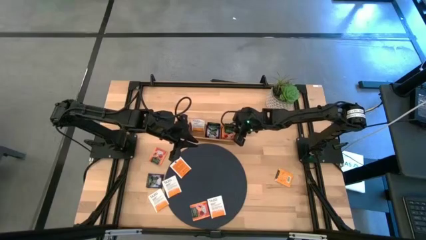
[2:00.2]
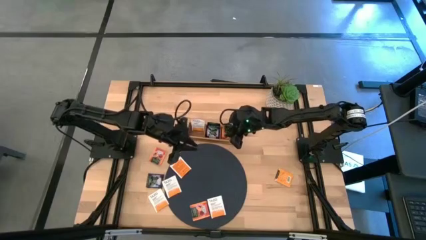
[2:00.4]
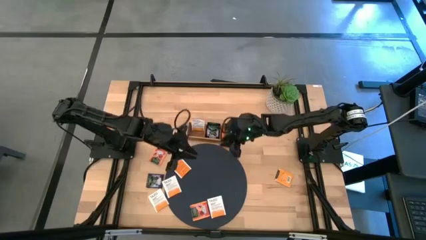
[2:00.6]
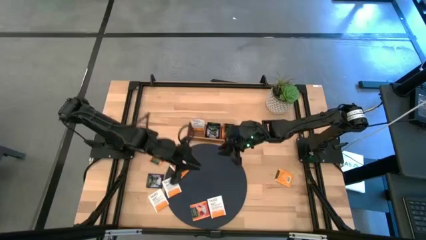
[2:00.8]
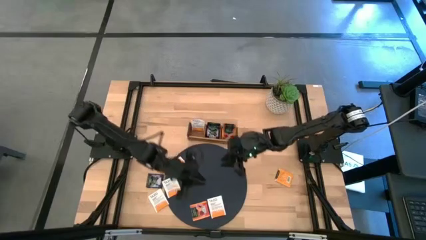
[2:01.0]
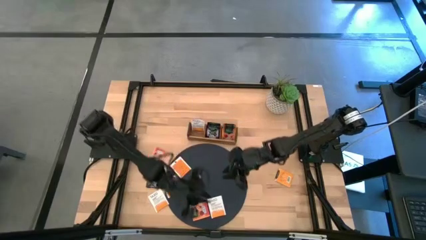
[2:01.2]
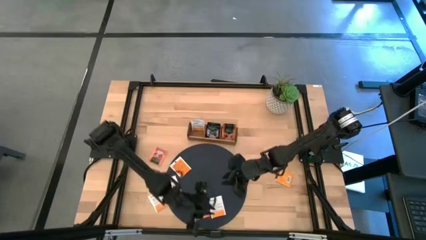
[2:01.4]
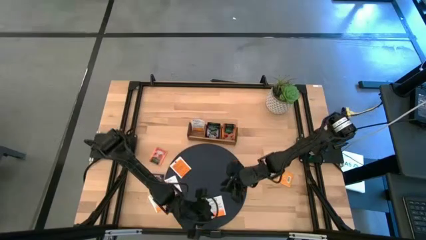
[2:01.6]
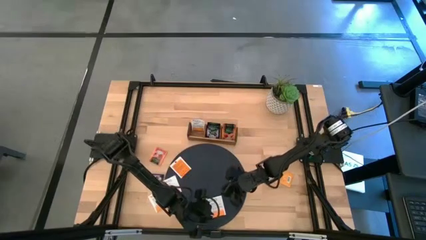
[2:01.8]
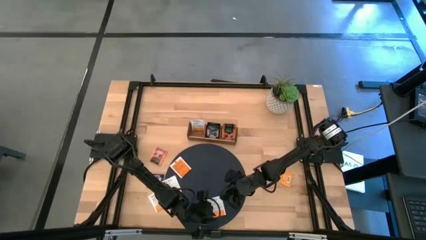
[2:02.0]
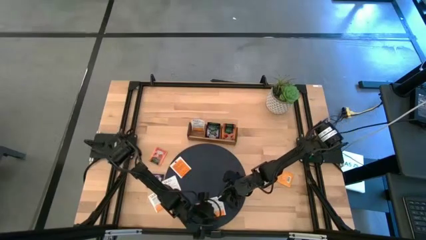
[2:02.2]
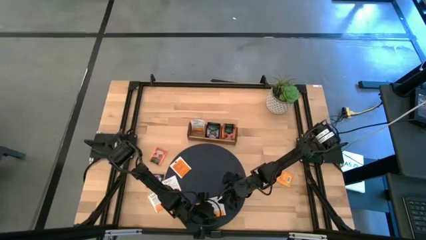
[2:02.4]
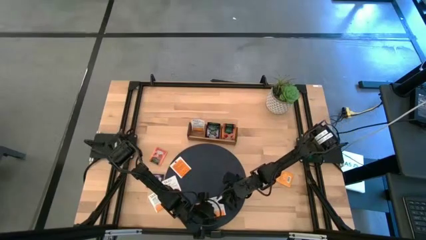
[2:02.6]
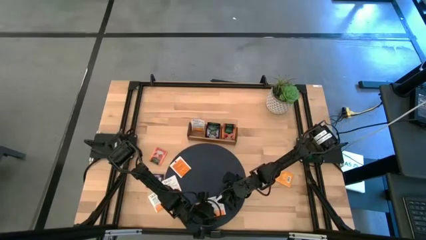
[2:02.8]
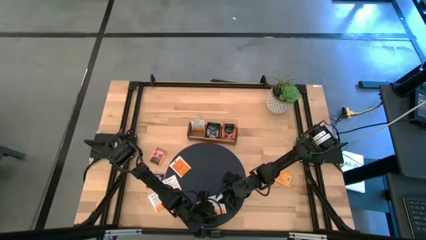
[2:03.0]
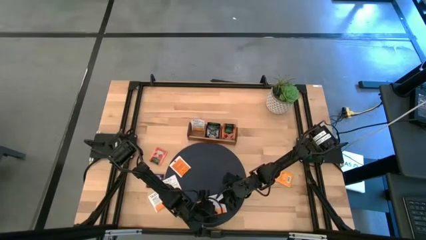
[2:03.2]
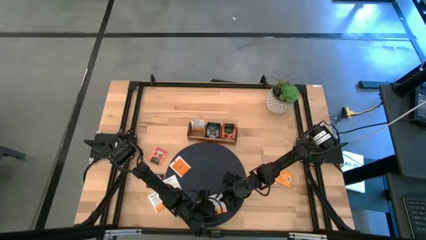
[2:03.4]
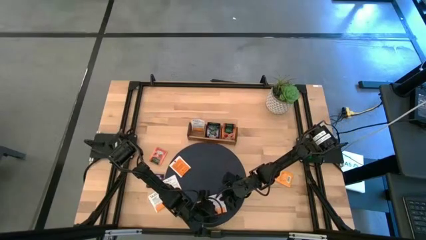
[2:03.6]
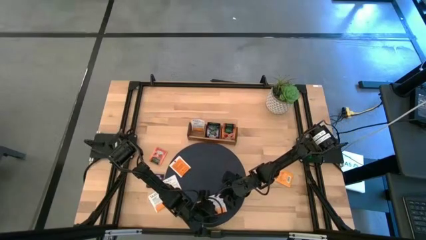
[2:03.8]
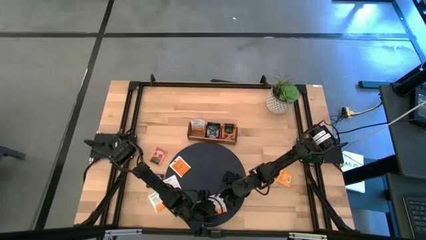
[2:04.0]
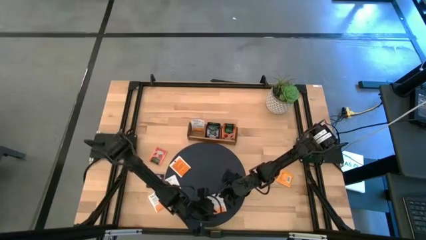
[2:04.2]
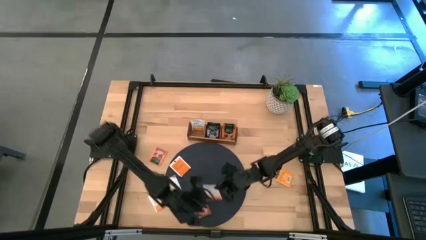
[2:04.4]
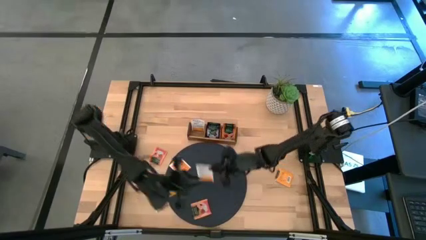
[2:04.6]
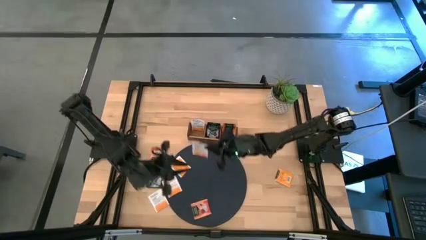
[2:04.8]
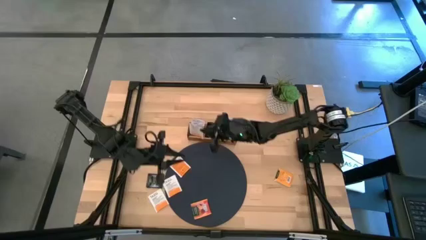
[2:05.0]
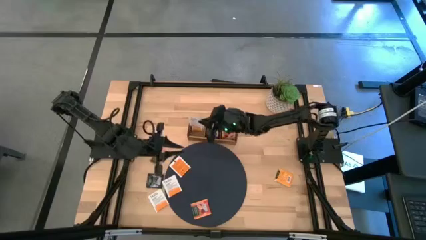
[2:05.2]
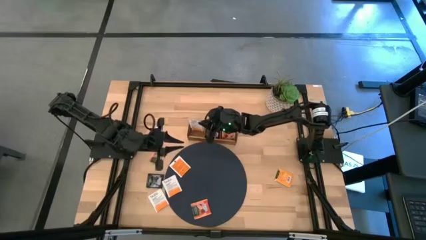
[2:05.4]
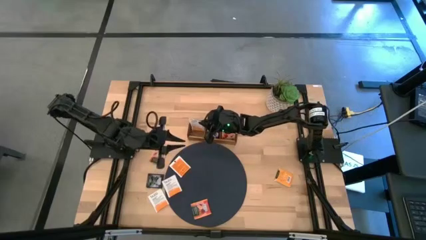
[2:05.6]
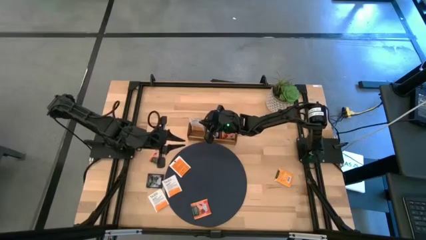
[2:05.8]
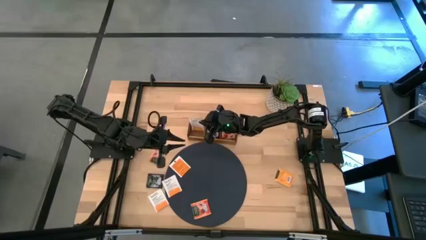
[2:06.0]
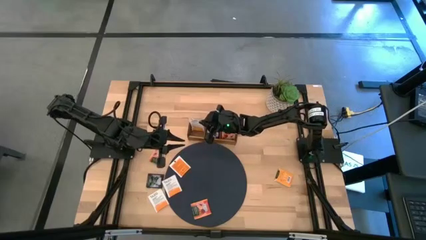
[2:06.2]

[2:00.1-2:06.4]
Task: Pick & Place Tea
Put the white tea bag into the left of the wooden organizer

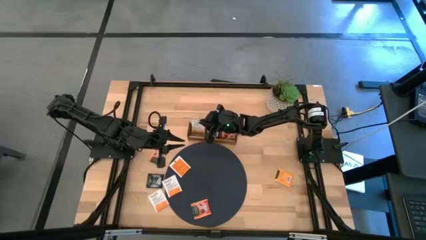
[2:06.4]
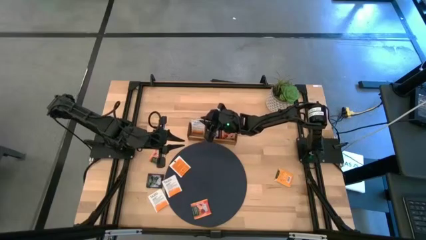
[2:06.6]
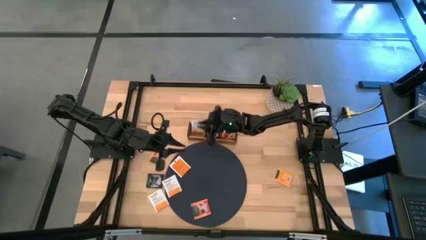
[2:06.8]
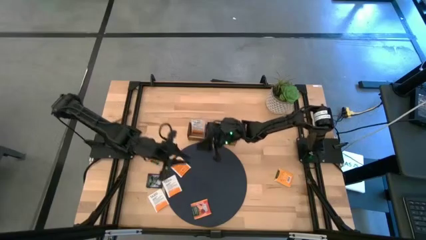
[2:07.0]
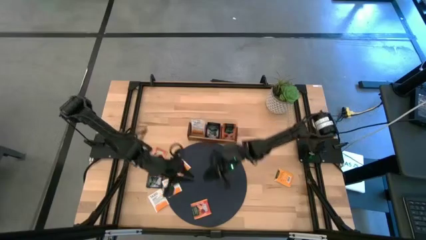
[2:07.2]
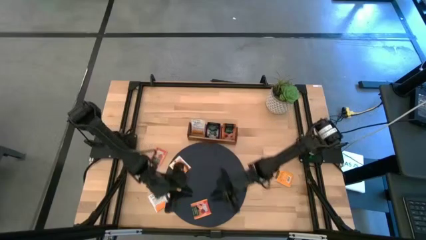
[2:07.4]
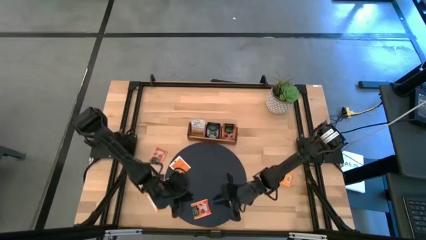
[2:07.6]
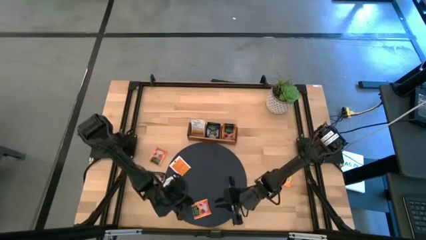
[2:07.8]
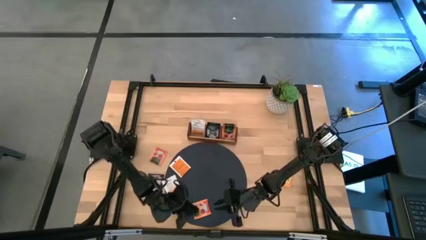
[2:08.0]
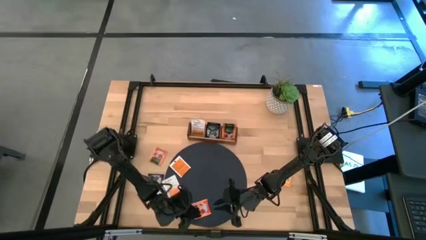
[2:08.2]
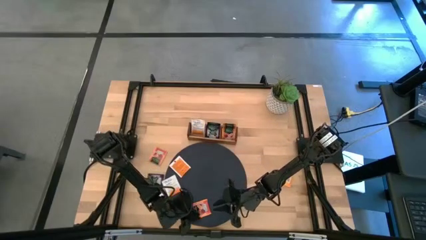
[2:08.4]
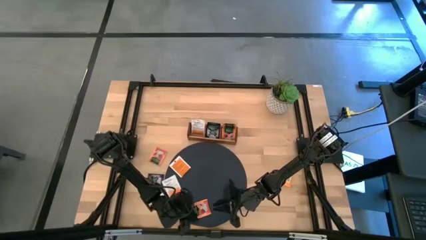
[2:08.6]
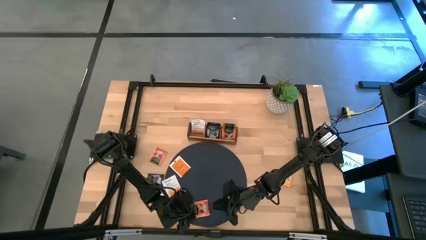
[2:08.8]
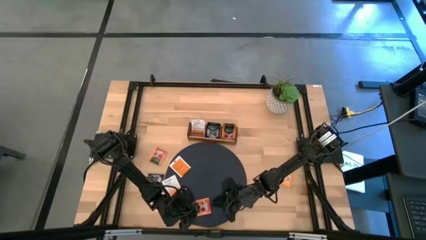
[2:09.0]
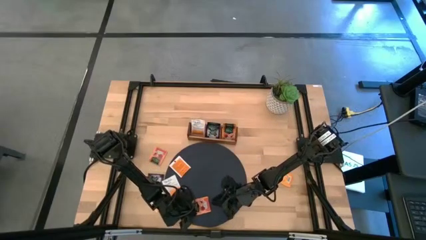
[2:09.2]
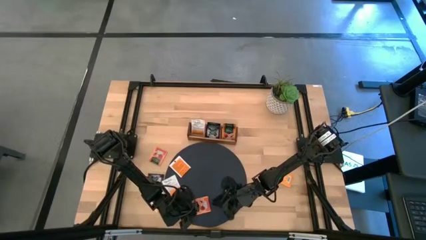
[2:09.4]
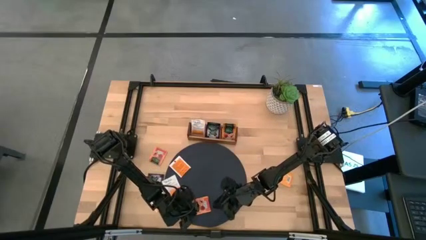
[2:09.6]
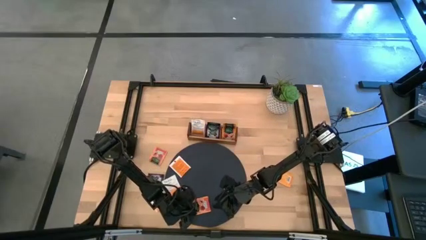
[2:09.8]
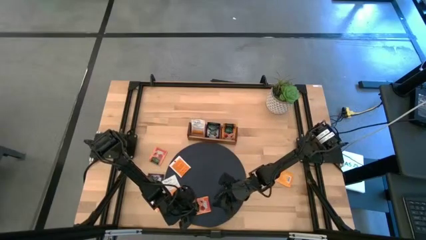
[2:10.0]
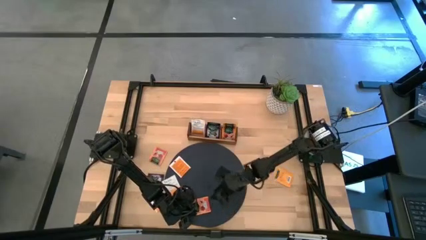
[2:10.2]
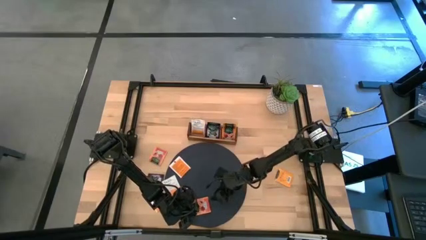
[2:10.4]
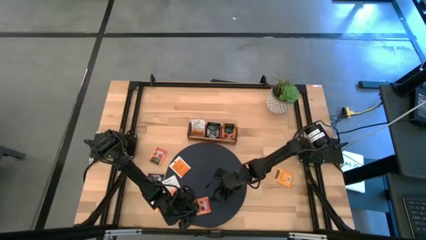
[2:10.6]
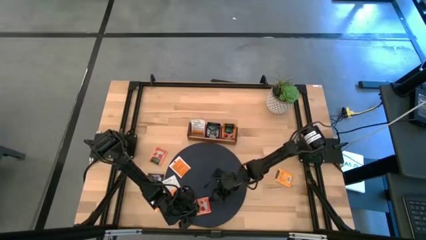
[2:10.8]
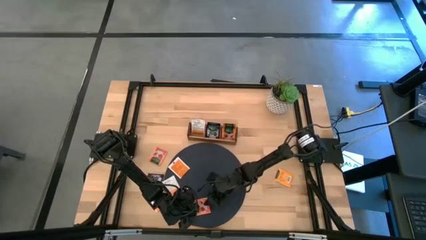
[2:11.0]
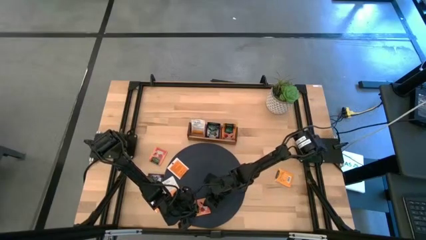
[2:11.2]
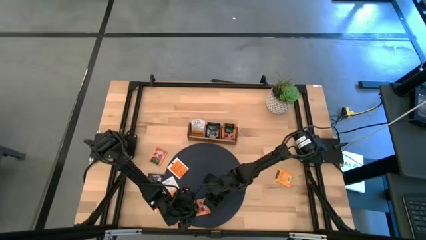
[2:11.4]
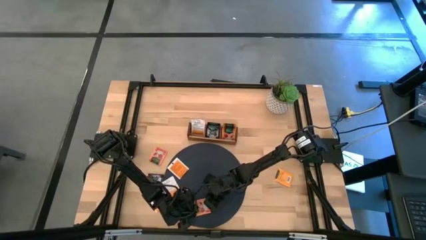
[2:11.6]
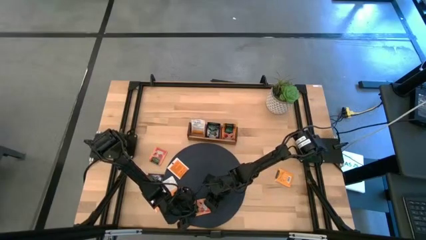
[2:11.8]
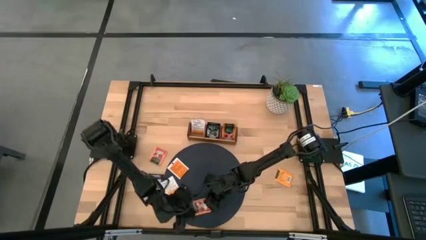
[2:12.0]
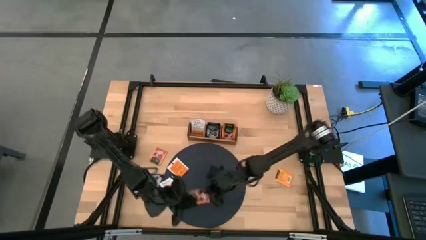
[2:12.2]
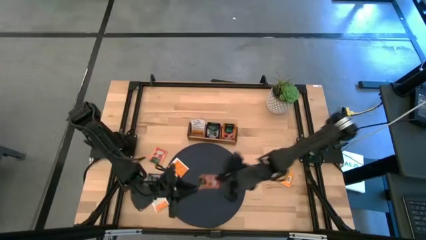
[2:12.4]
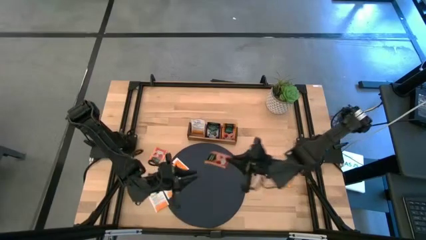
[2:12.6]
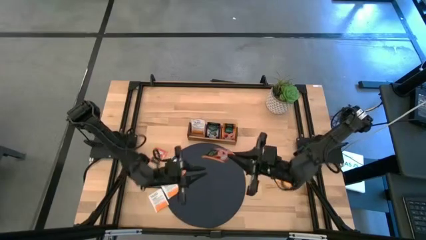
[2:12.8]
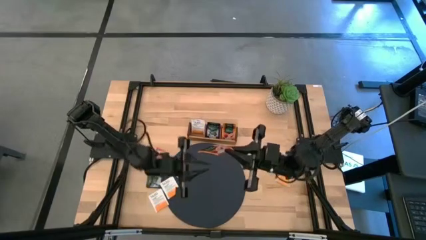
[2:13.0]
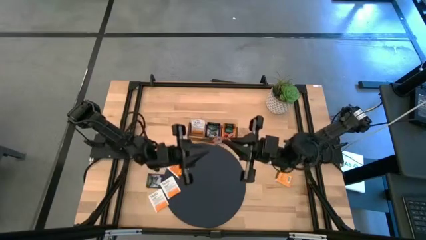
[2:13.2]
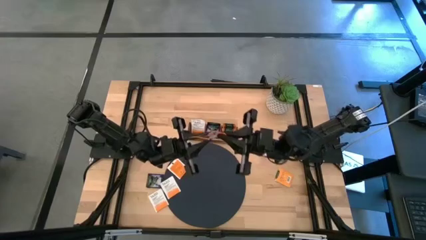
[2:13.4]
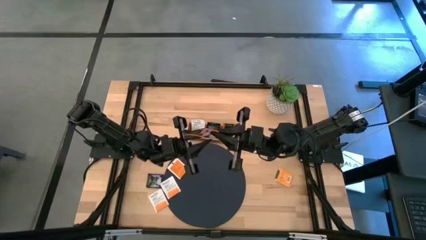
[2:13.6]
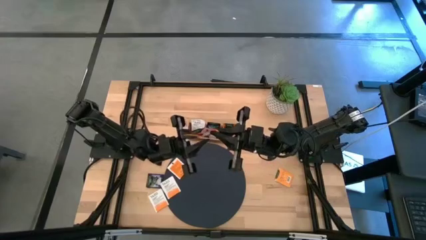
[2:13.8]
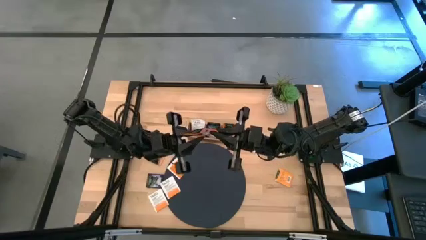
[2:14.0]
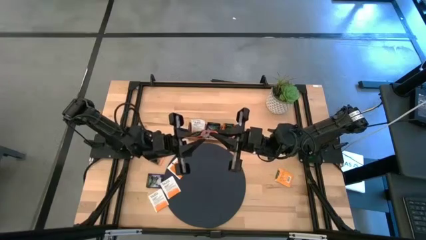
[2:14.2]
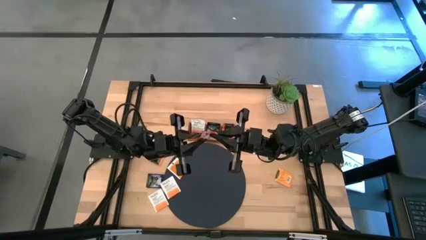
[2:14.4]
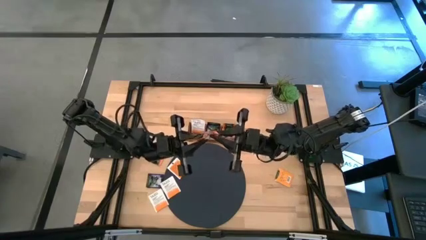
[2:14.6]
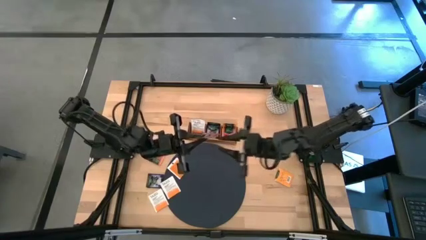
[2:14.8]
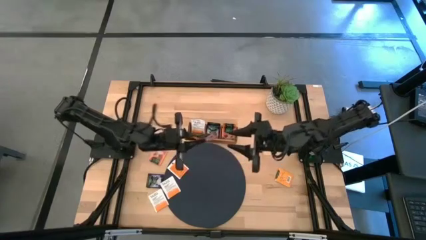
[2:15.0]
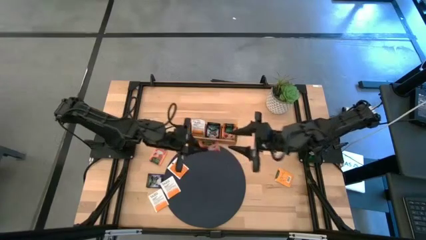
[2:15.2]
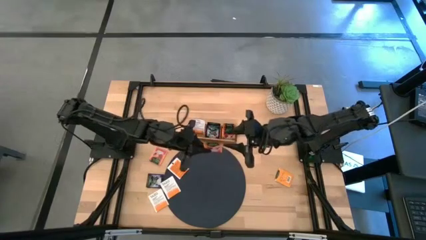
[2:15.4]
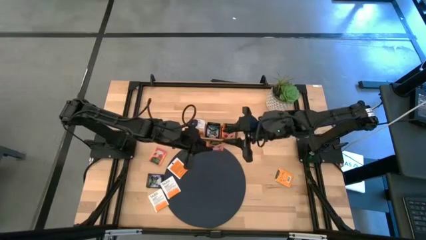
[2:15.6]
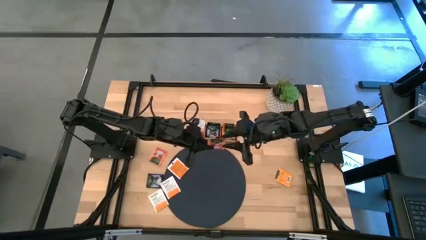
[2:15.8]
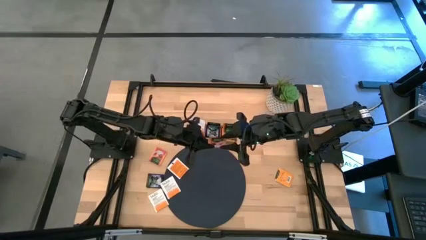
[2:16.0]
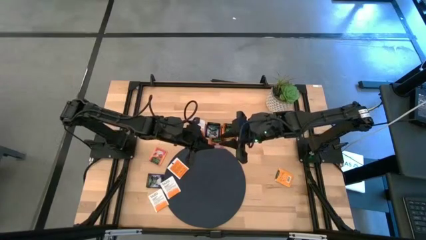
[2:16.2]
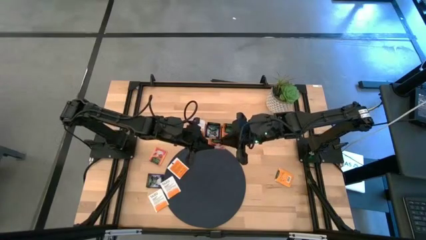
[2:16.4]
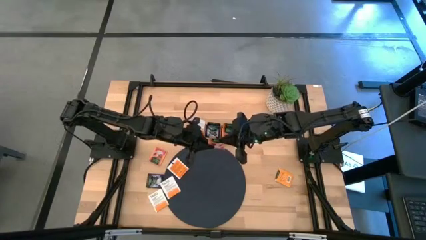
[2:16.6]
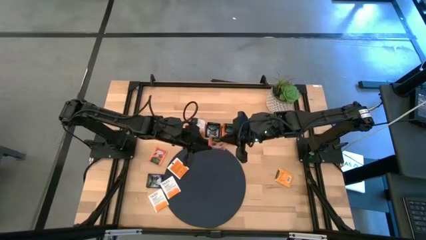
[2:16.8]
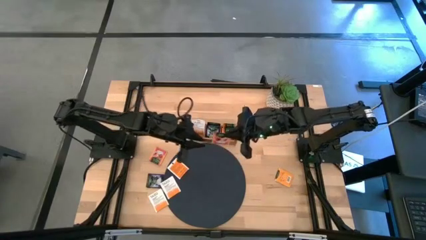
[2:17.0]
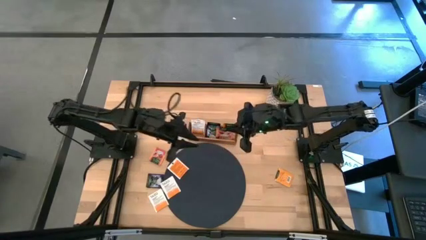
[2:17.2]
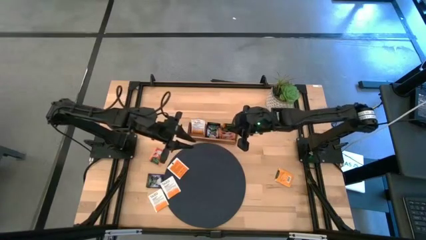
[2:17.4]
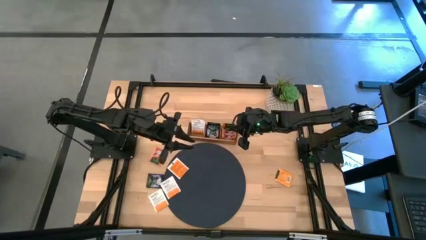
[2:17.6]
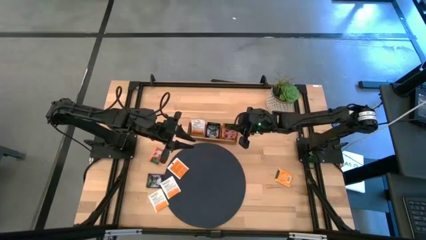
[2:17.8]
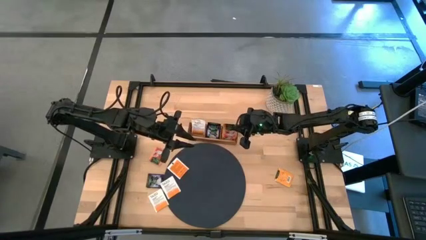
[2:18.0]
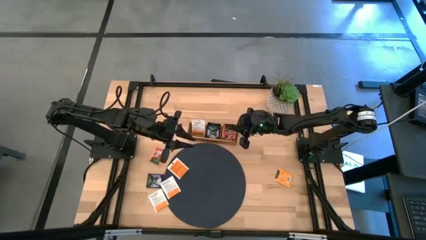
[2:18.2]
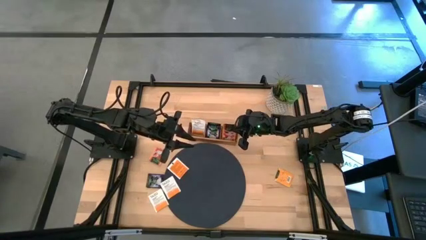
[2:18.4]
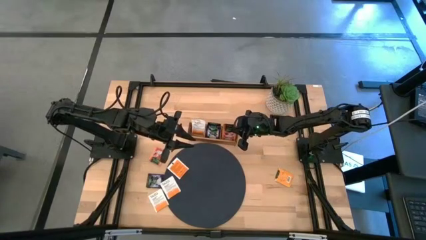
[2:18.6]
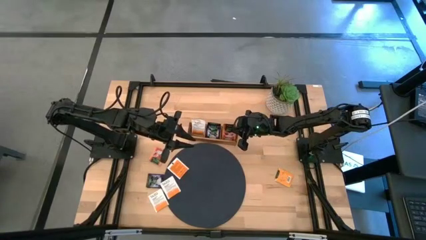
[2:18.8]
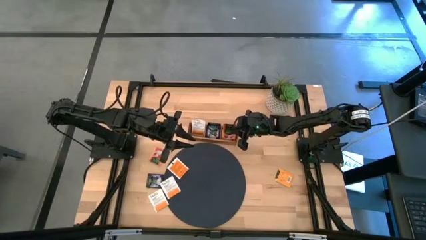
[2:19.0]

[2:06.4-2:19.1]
Put the orange tea bag into the right of the wooden organizer
